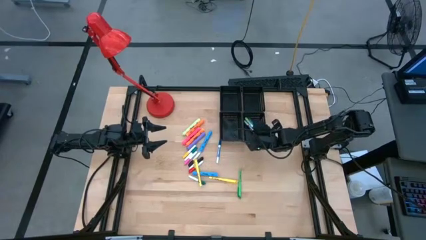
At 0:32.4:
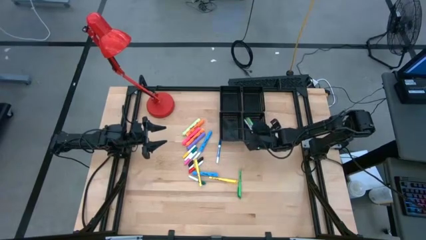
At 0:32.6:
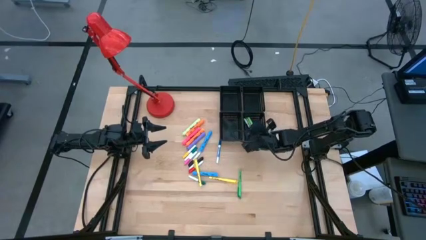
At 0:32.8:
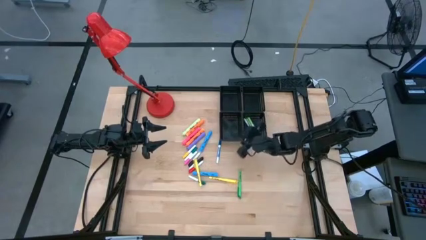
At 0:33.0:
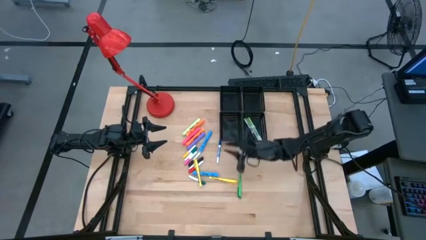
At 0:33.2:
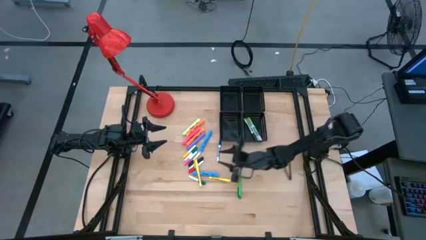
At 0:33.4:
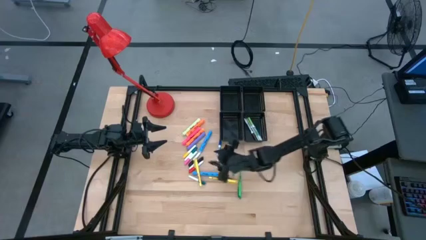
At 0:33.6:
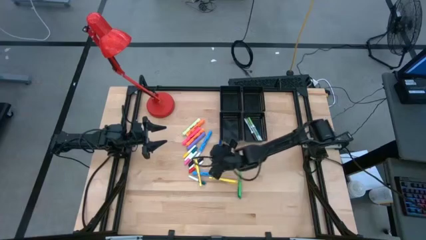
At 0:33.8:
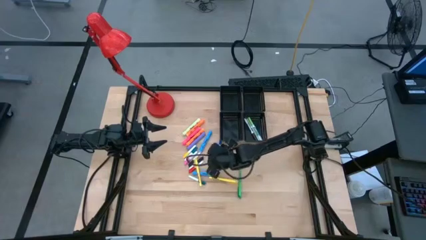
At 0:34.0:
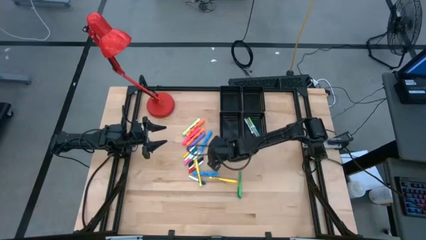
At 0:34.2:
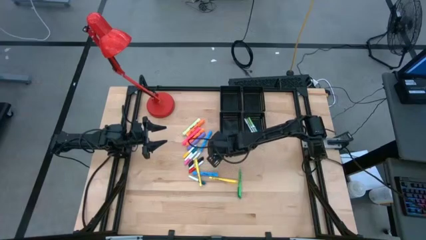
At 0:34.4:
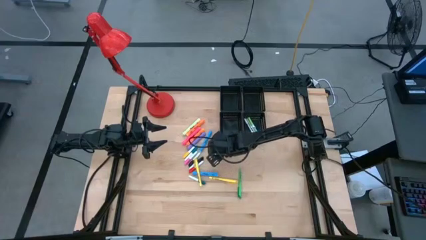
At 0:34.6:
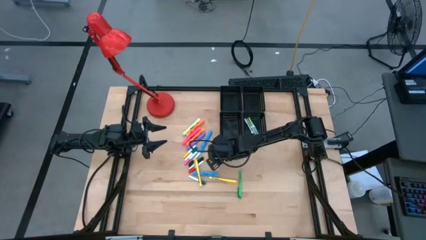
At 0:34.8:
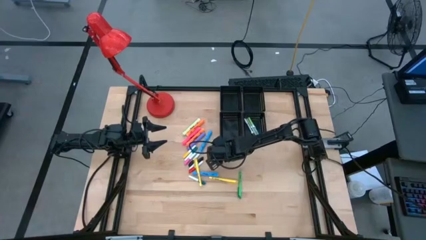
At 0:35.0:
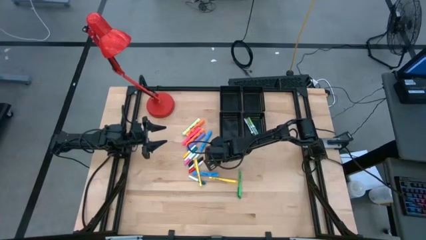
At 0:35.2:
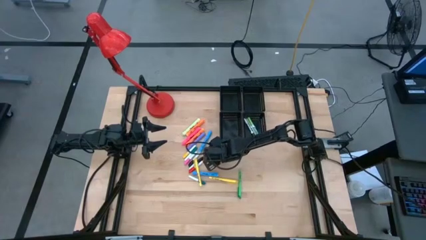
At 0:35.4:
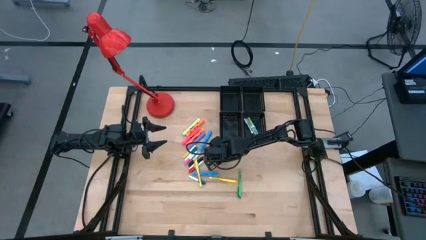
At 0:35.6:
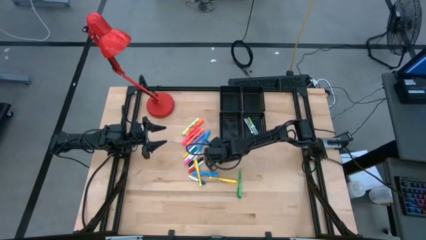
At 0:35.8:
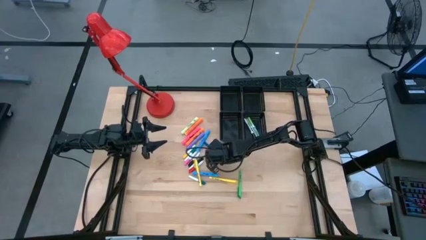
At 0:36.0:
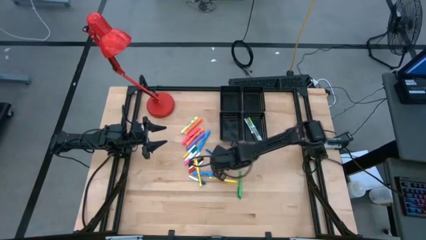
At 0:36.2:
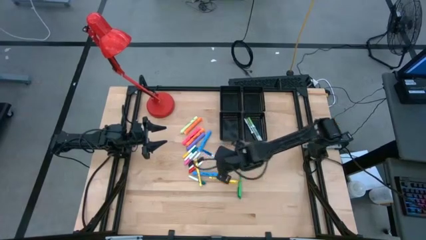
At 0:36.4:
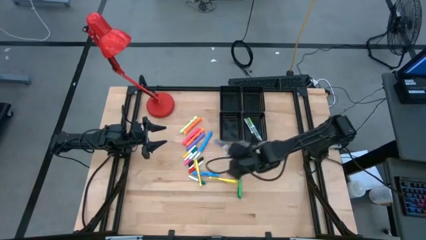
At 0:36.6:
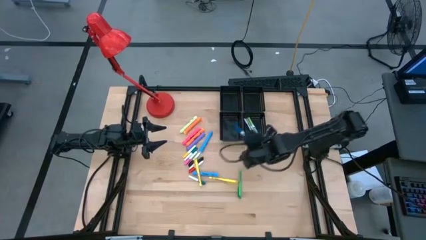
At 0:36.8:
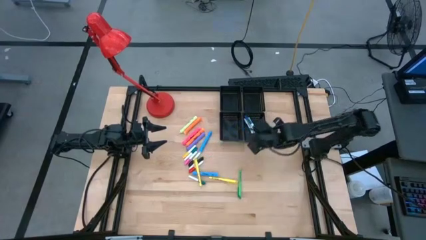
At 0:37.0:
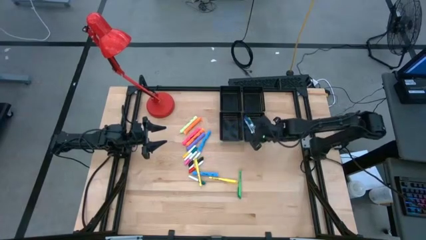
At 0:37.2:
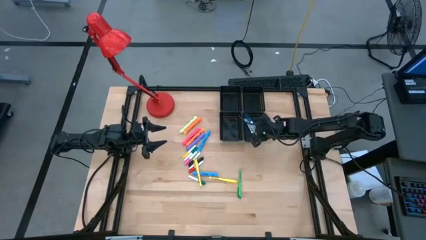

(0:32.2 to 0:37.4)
Task: Pick & Place Markers
Put the blue marker pen into the bottom right black bin

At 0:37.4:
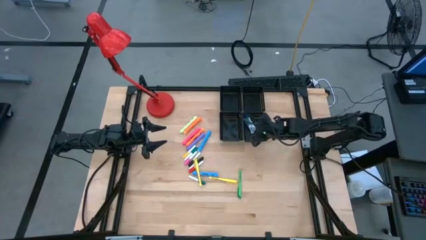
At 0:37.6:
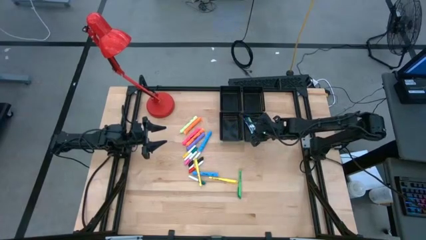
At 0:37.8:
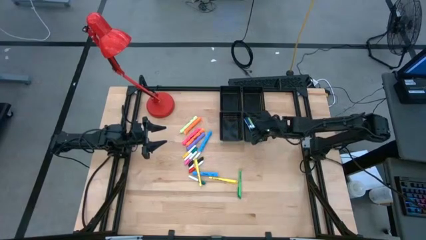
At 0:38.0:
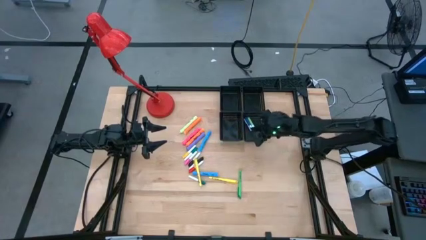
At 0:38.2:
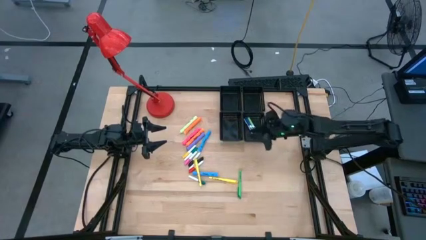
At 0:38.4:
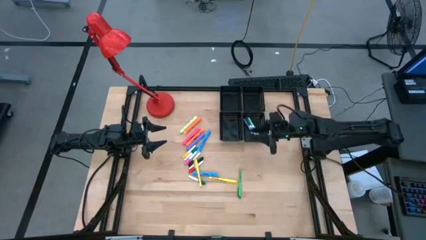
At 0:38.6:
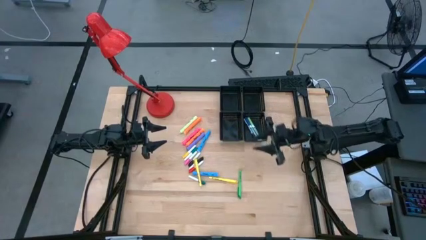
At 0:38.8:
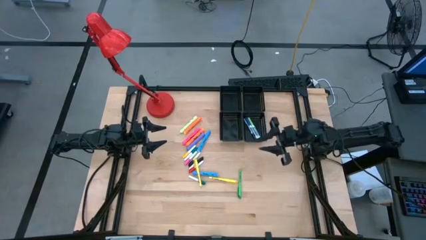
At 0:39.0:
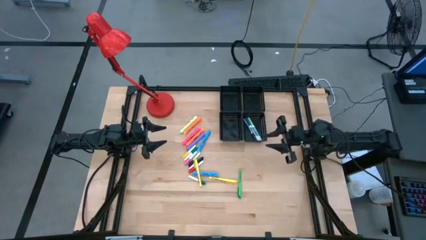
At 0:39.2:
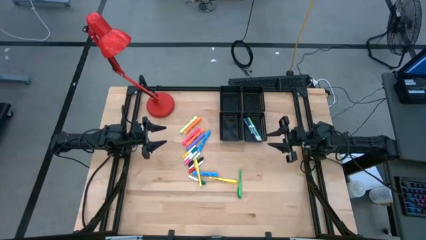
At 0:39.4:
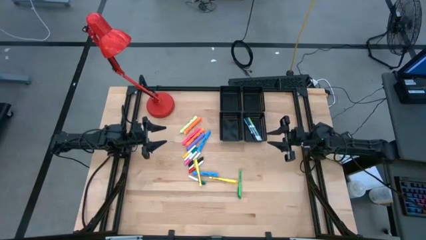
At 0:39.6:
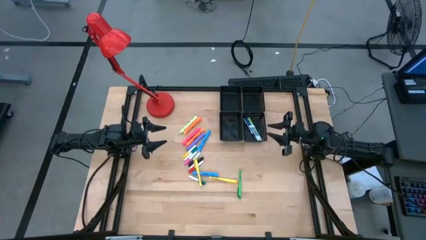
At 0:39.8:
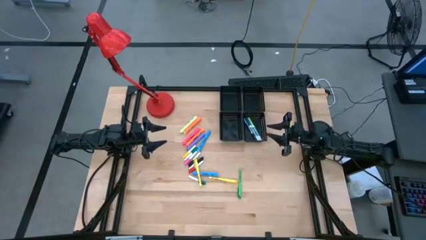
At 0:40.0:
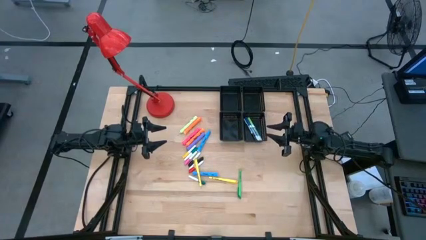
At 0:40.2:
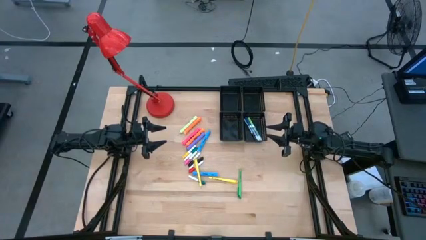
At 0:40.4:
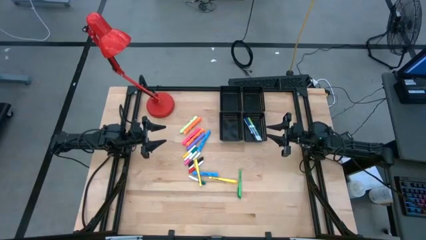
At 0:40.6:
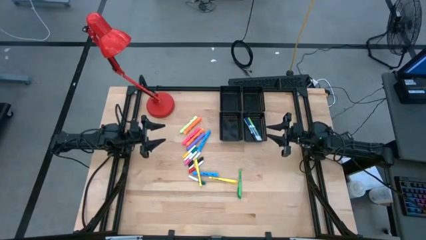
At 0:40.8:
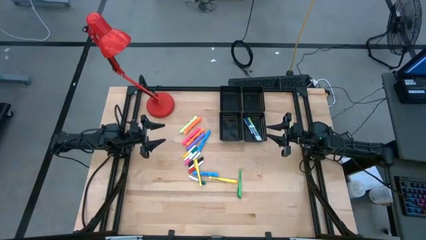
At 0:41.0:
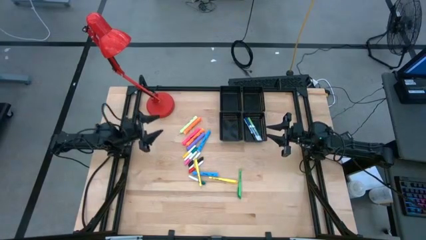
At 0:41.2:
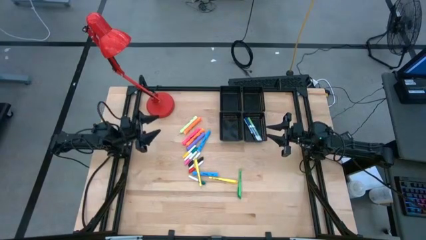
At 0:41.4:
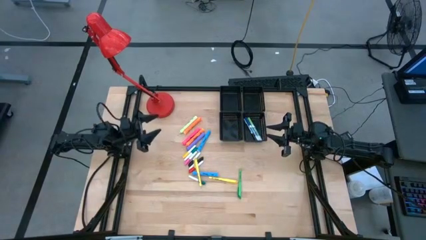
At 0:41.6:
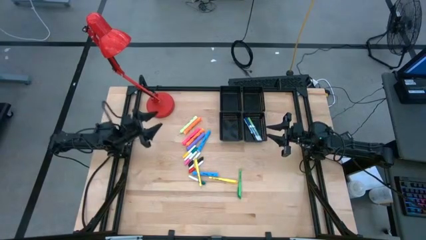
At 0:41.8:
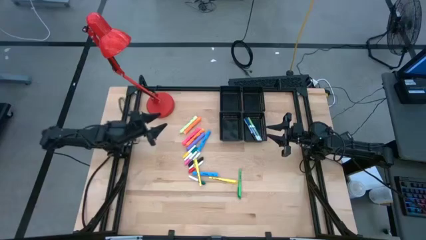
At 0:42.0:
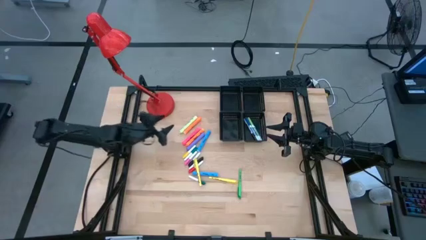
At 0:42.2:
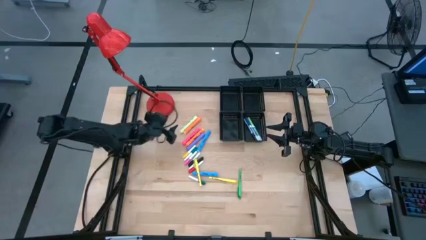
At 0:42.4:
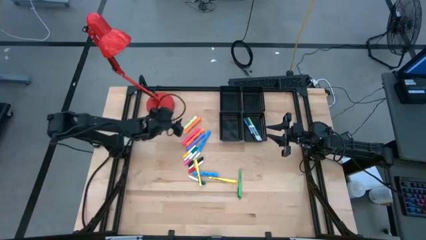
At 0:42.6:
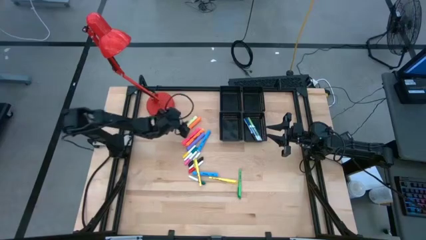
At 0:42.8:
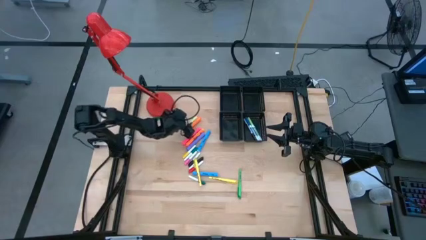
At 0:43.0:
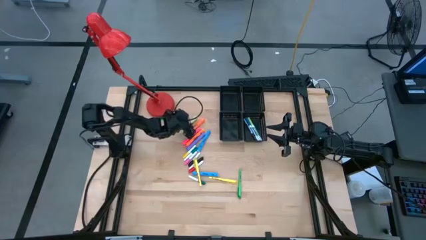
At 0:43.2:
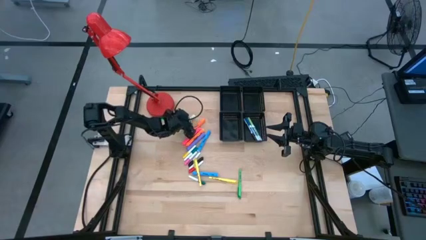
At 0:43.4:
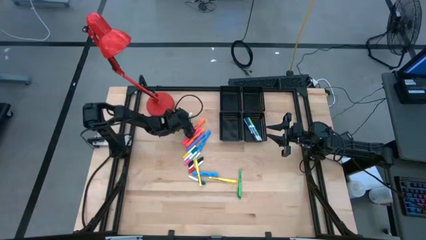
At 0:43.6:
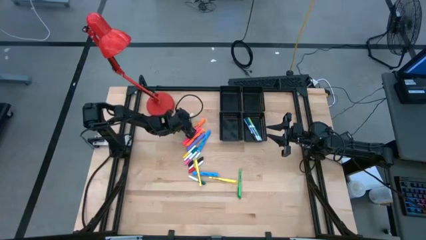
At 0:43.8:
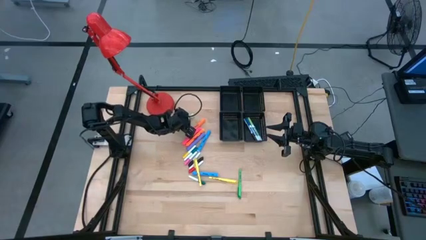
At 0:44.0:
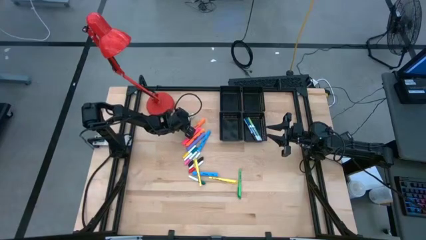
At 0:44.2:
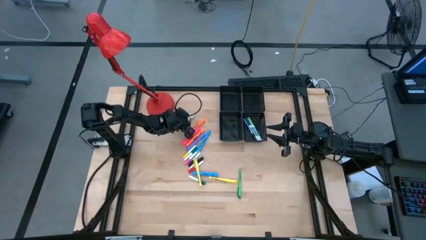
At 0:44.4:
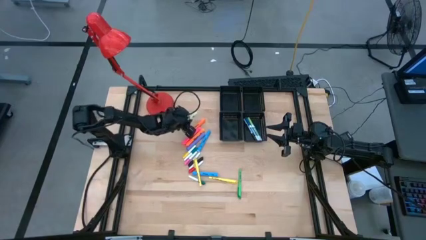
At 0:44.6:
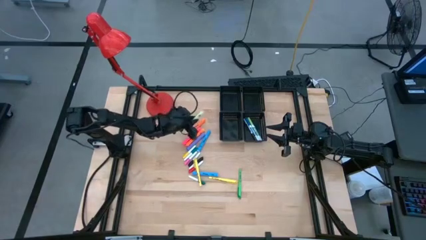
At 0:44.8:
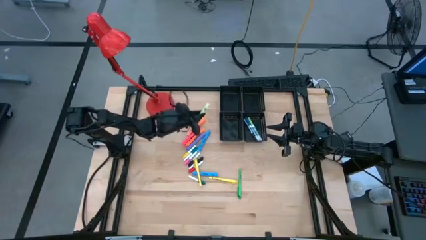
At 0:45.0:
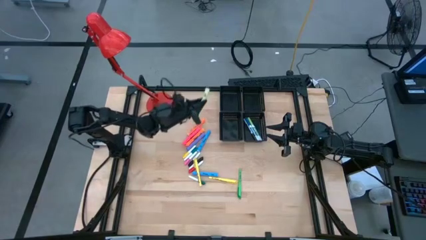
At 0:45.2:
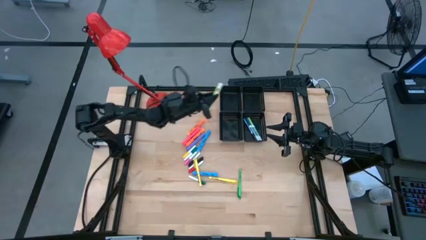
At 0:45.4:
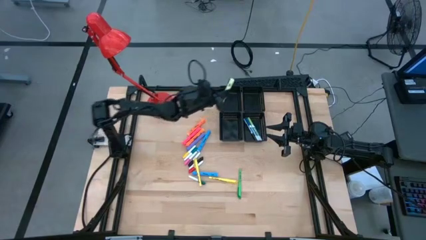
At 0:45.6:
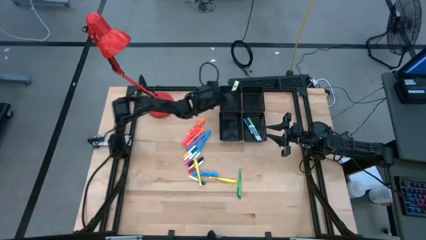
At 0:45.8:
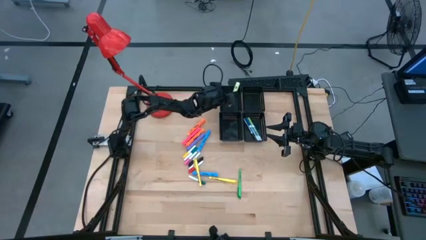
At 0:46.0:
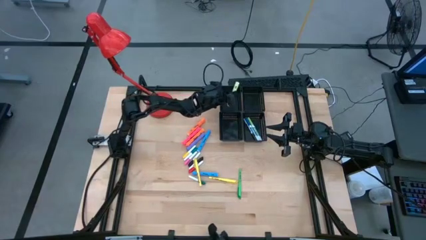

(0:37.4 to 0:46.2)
Put the green highlighter pen into the top left black bin

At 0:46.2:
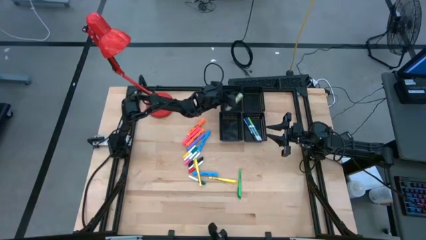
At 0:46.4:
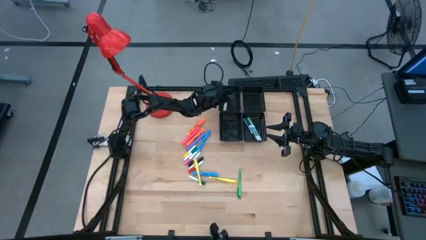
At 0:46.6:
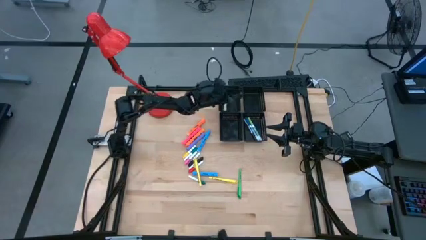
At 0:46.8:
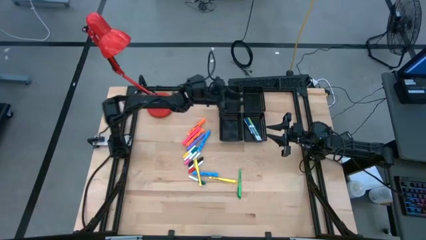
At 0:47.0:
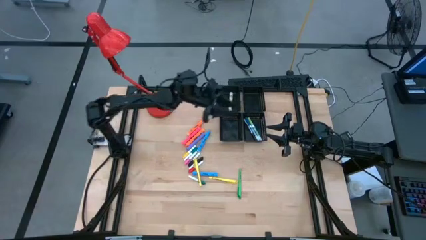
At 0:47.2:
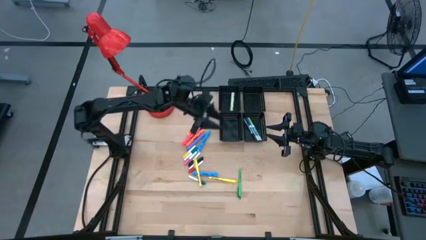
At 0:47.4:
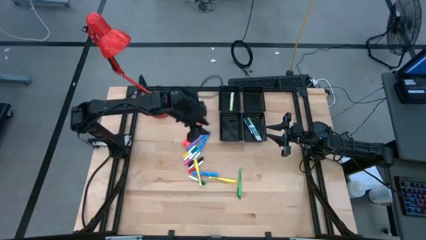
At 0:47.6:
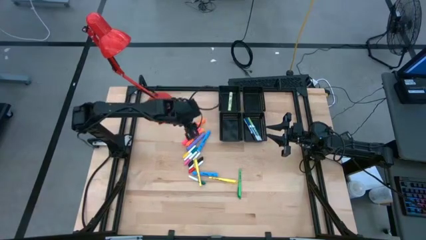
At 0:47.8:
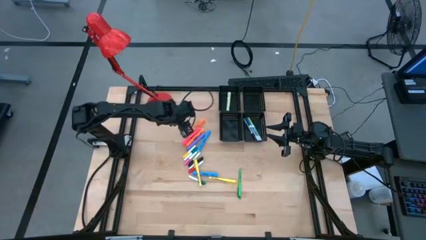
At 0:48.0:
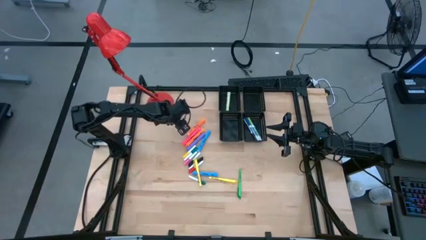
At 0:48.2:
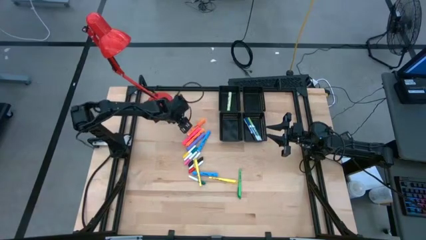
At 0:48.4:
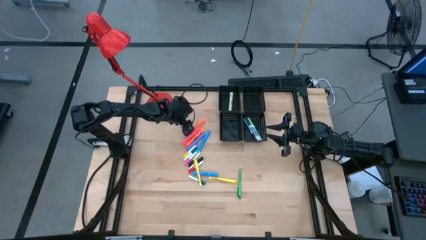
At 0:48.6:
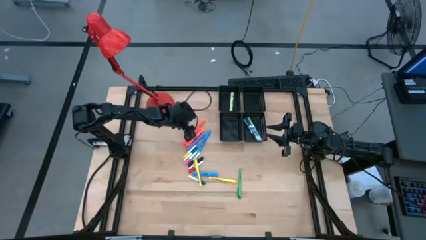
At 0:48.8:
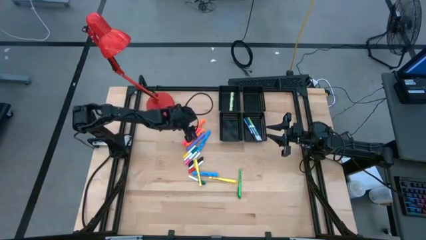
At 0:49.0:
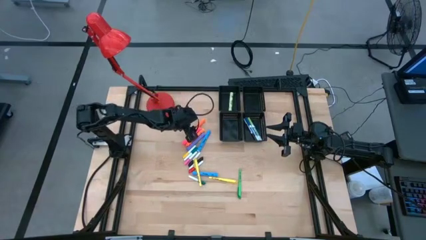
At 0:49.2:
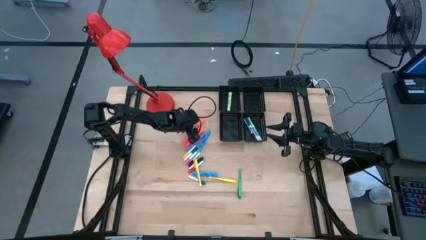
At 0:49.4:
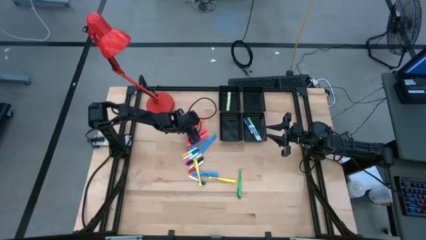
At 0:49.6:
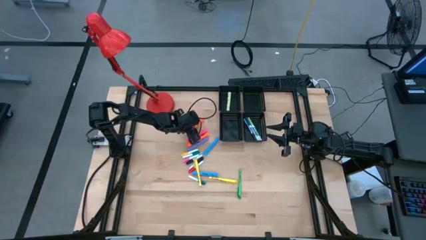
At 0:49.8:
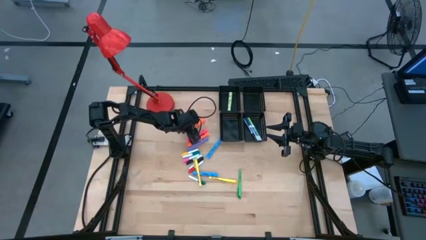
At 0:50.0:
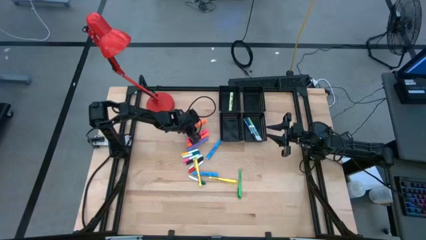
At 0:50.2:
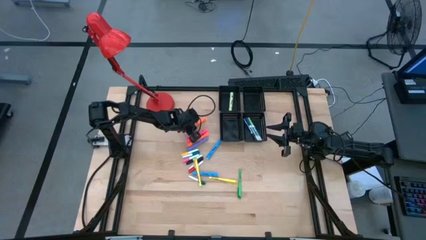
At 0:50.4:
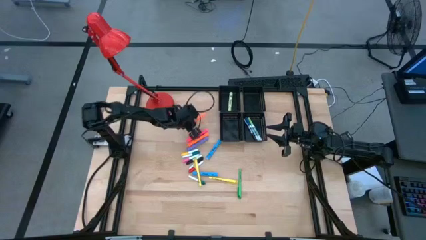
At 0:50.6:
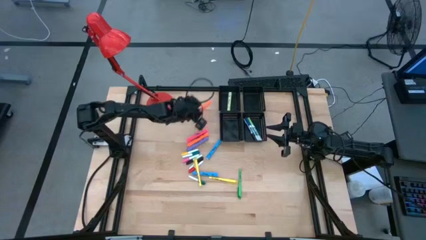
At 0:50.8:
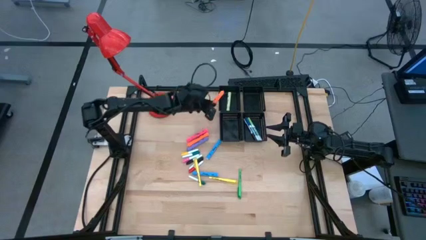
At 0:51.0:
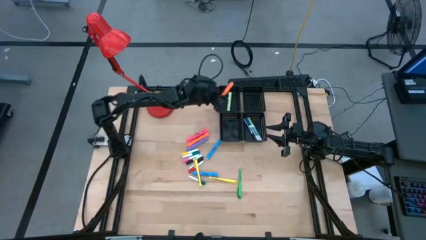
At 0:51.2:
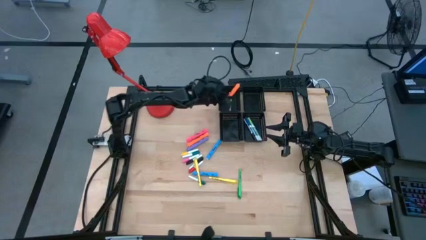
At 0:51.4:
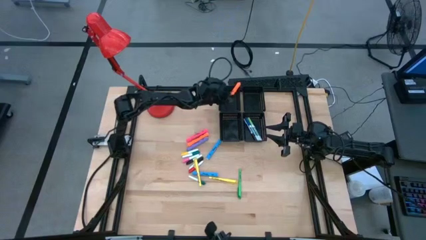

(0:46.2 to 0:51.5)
Put the orange highlighter pen into the top left black bin
